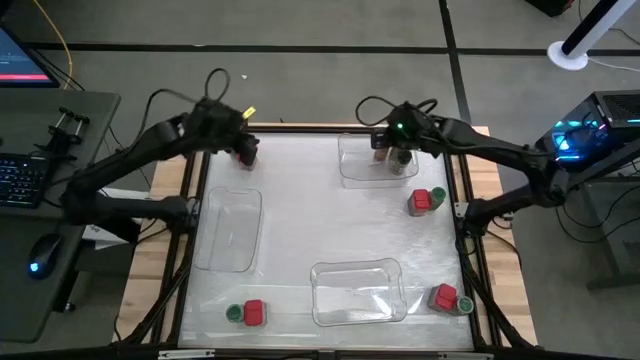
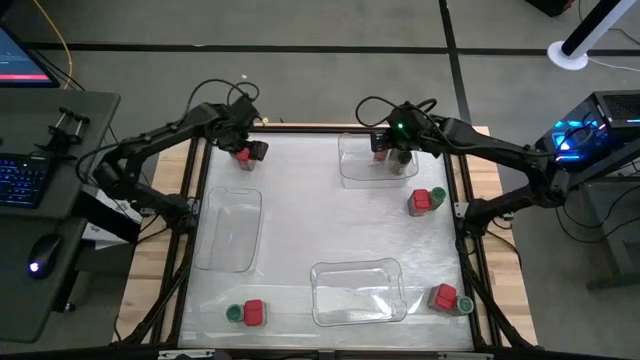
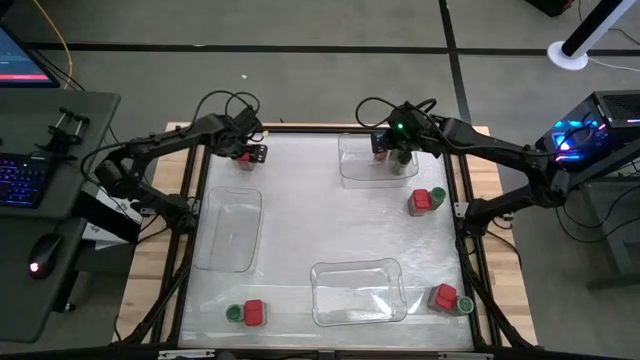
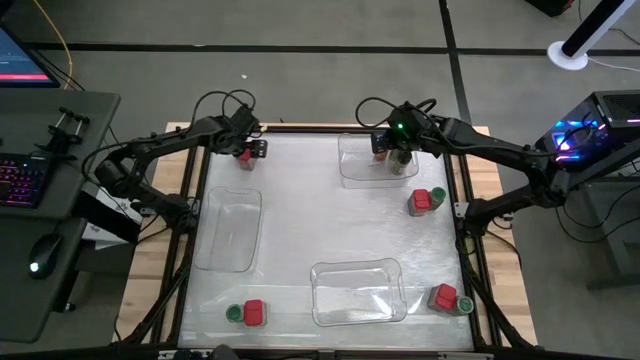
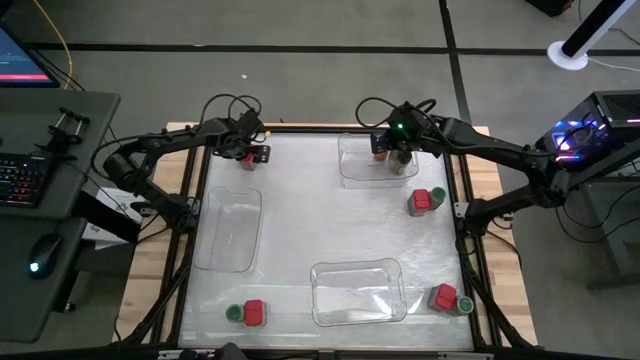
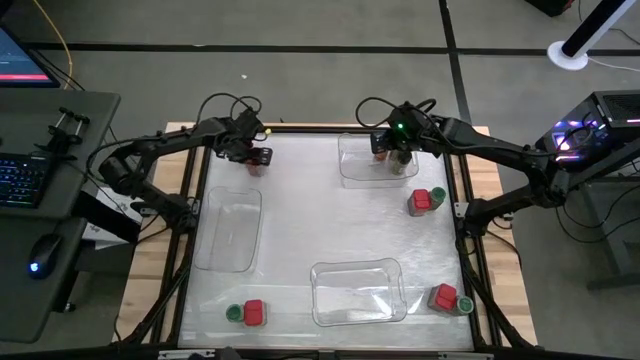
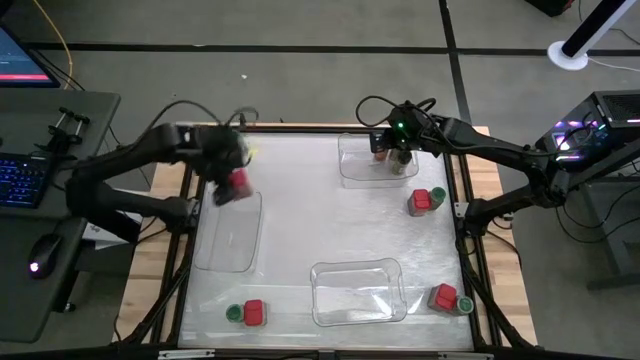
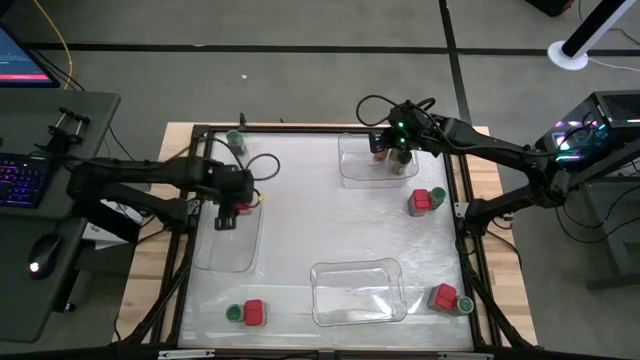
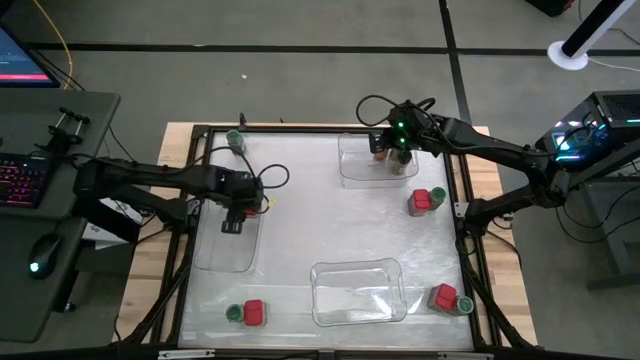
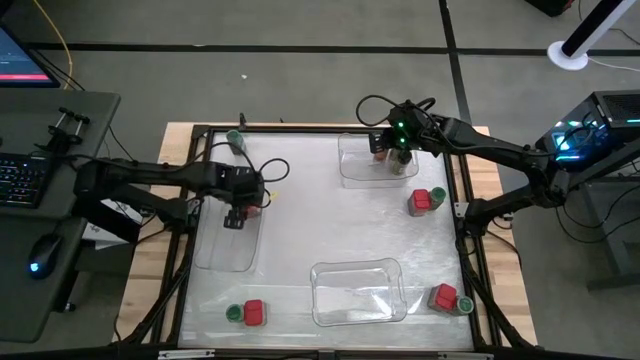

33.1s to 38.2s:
Task: Sort spices by type
Put the red seasoning can into the middle left transparent bin

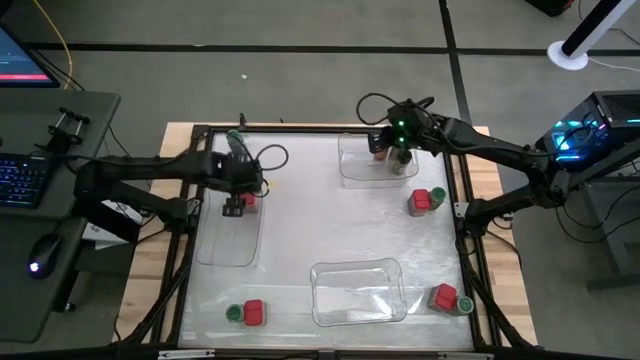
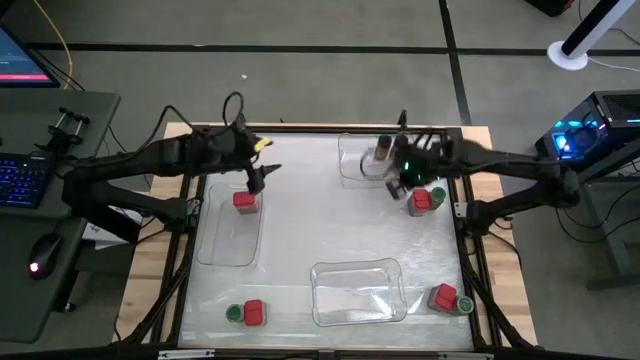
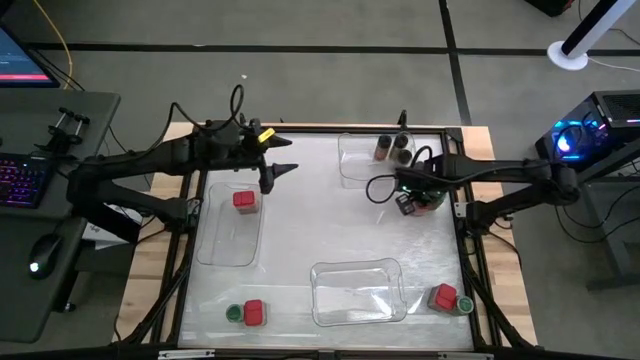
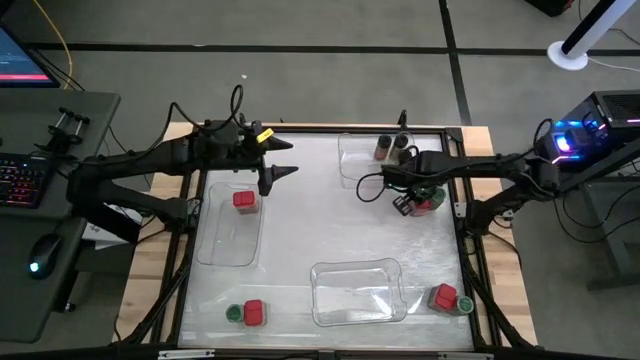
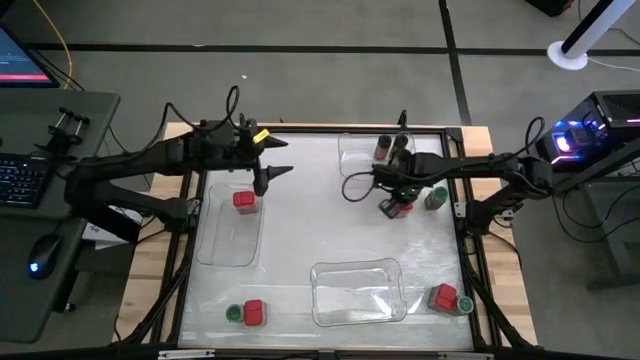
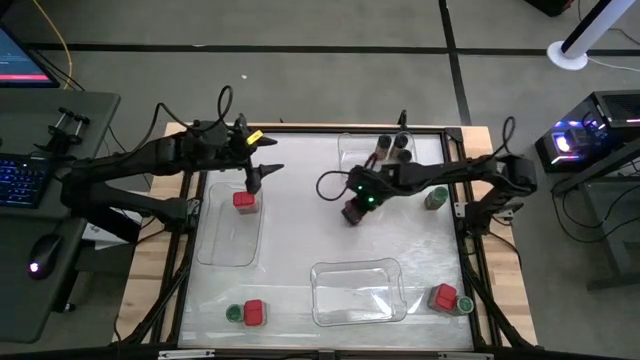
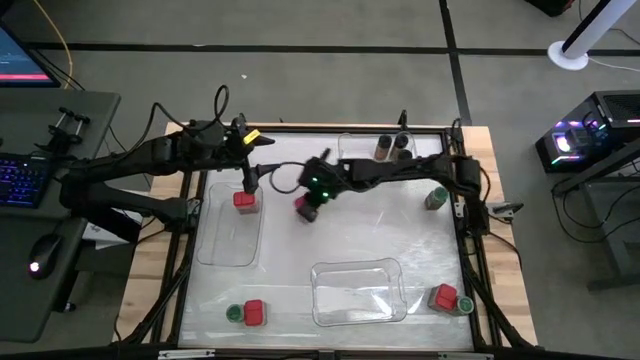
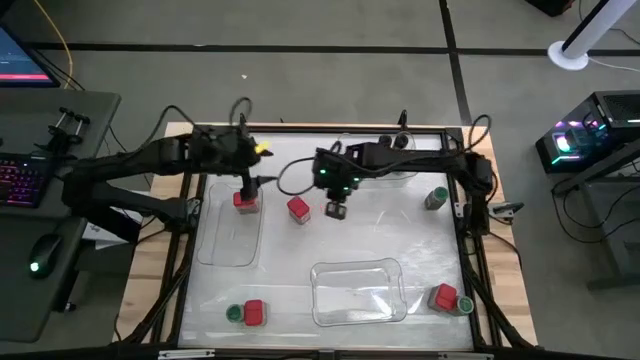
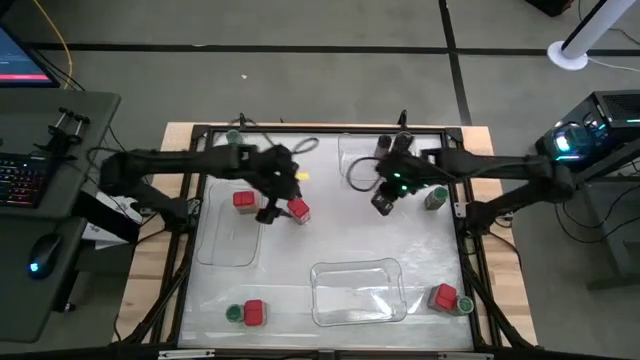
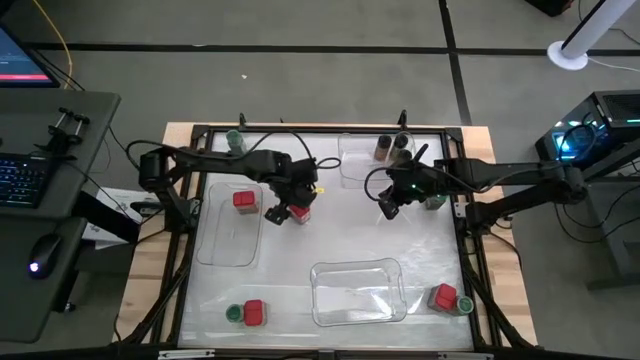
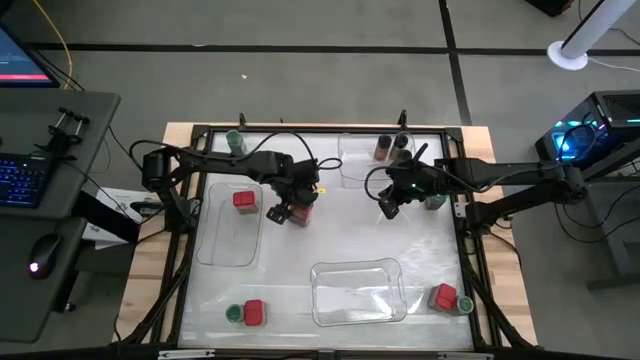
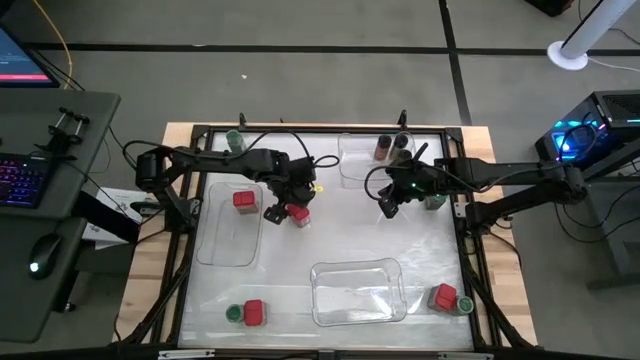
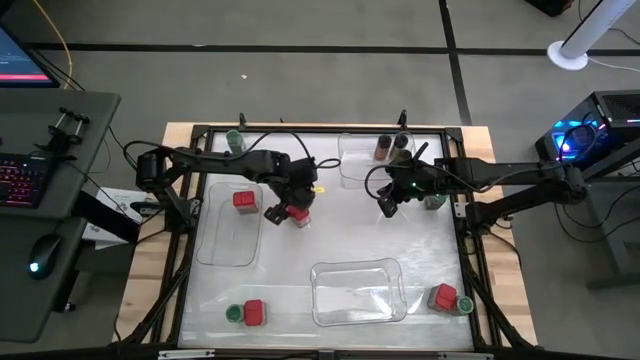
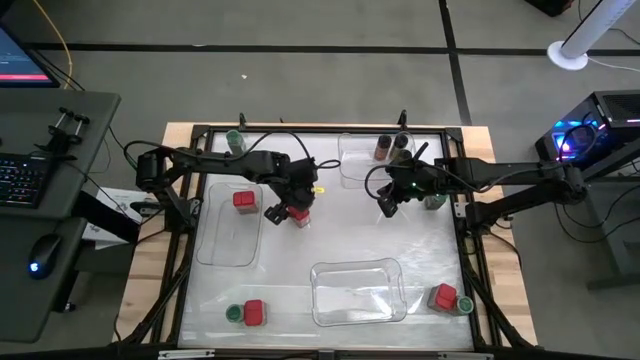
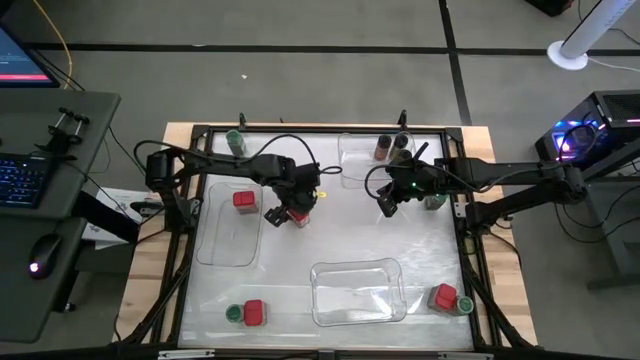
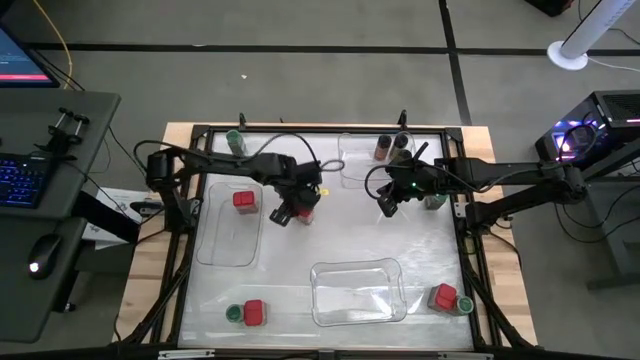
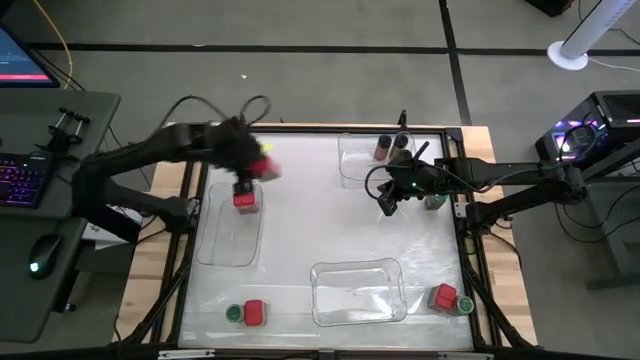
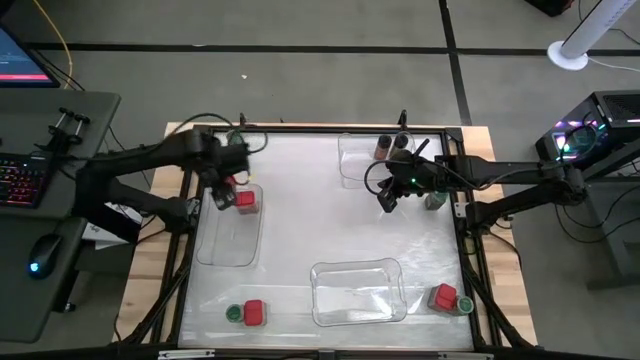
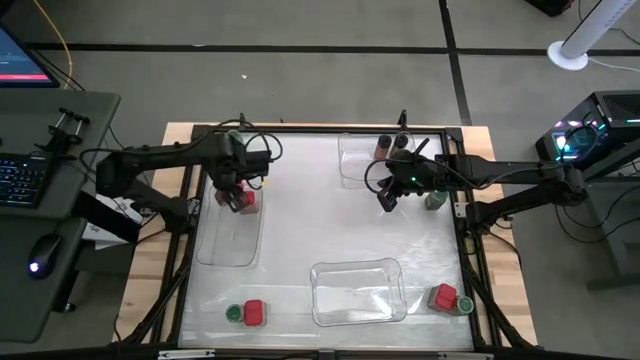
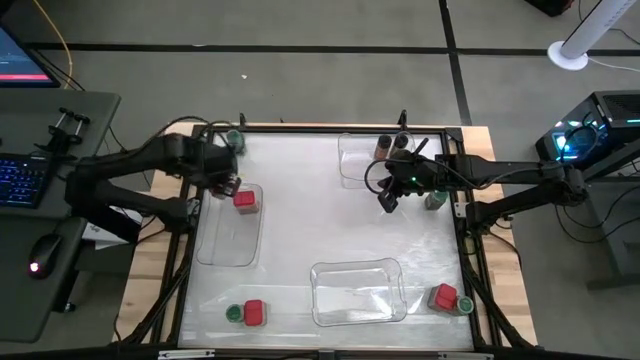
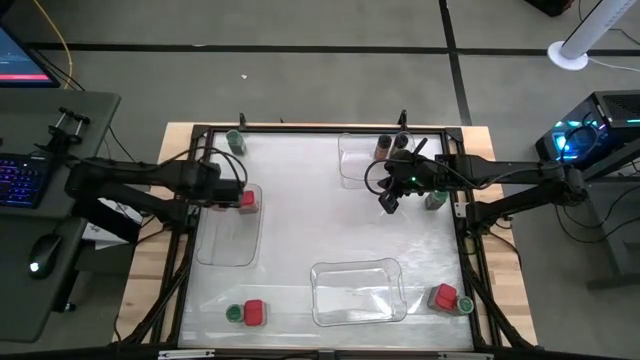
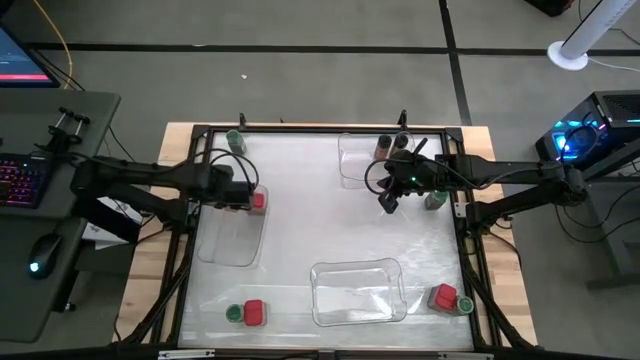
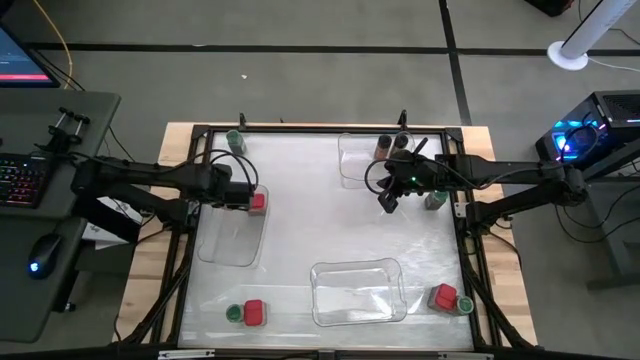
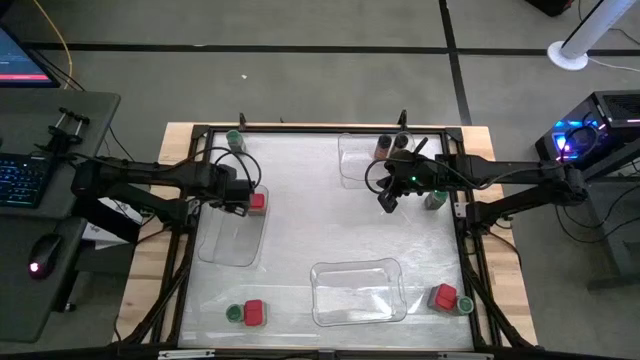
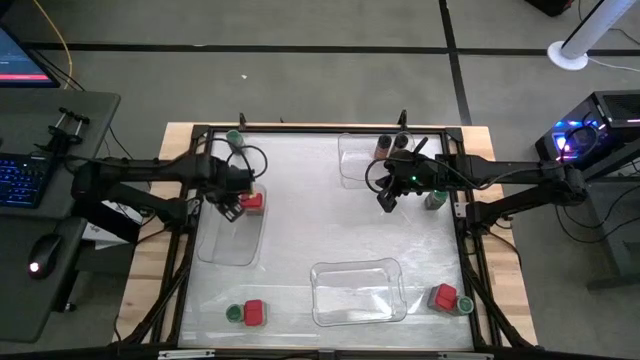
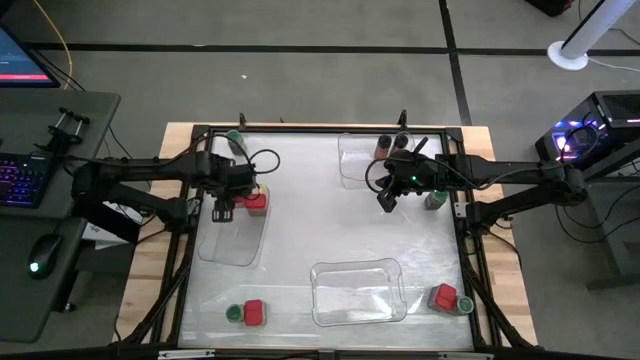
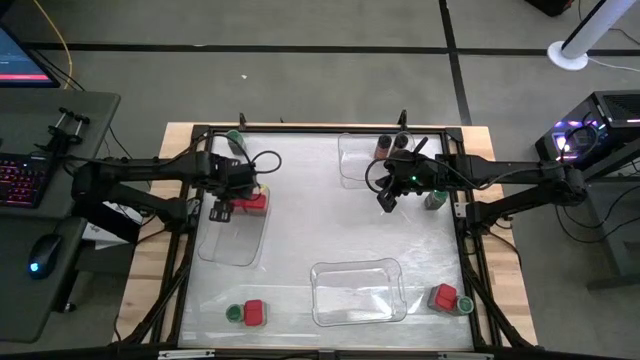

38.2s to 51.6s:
Put the red seasoning can into the middle left transparent bin

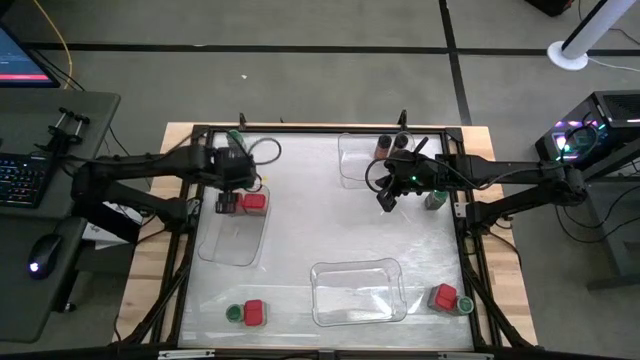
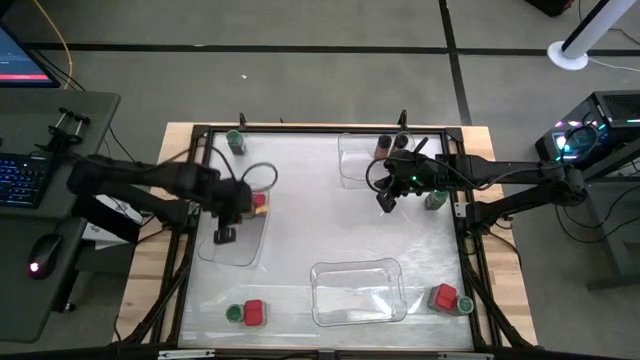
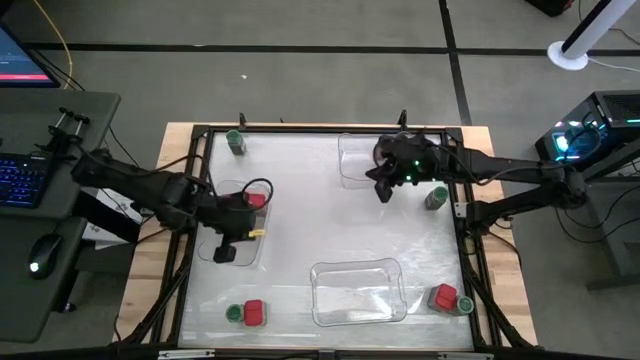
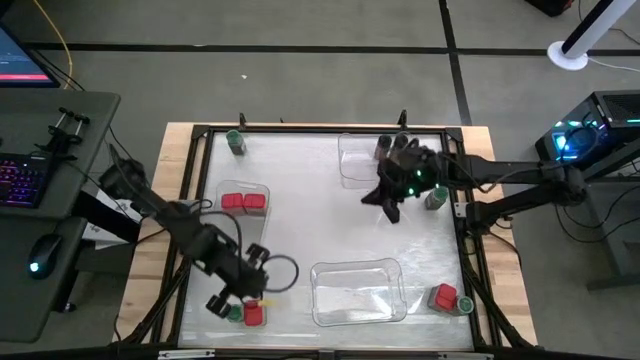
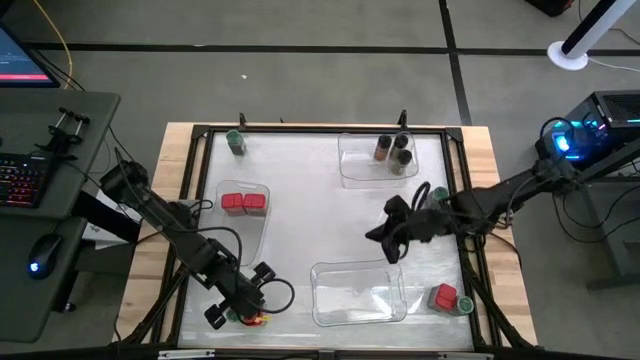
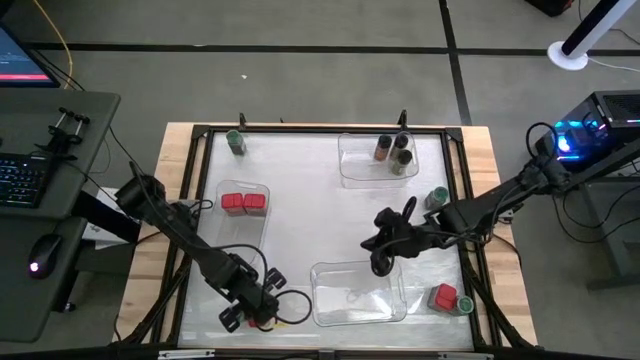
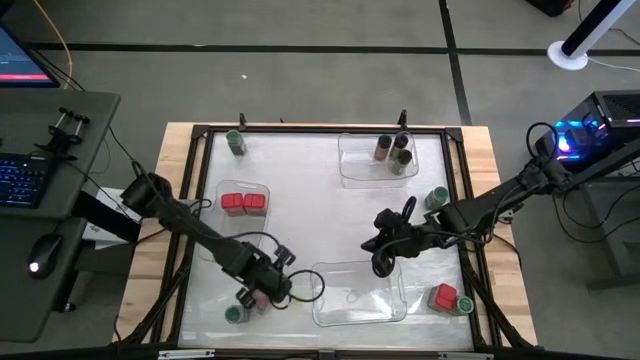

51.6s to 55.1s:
Put the red seasoning can into the middle left transparent bin
